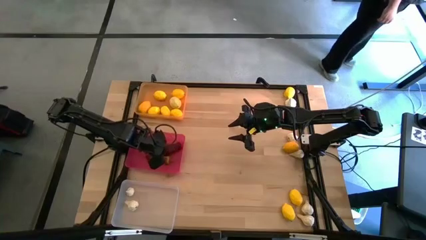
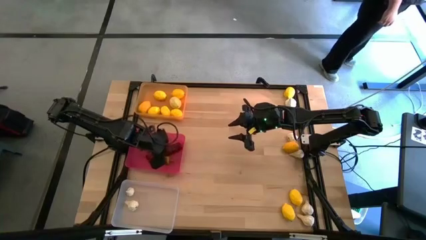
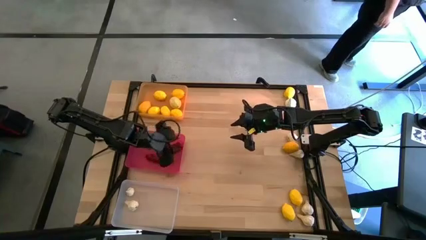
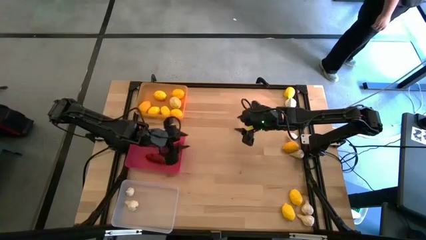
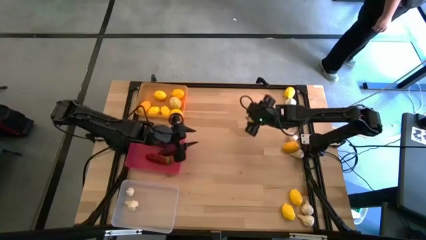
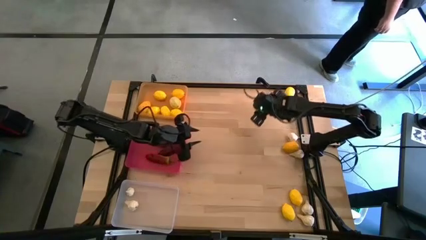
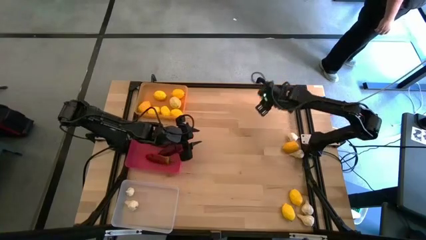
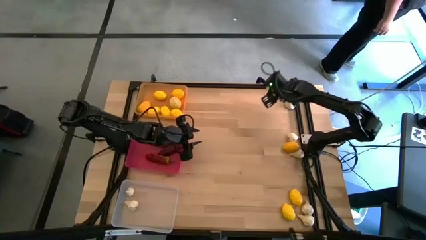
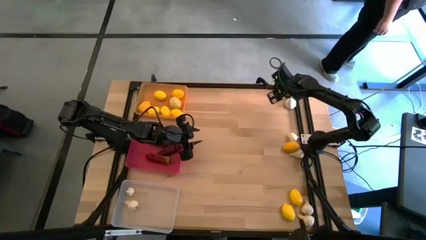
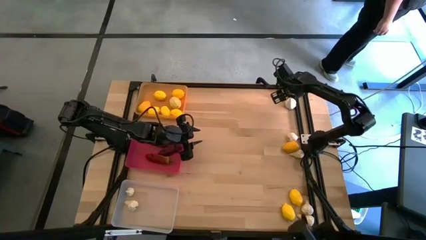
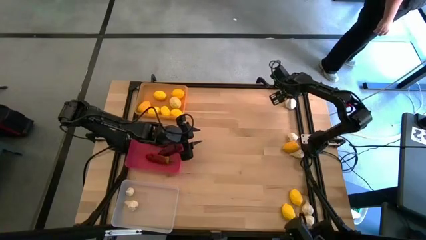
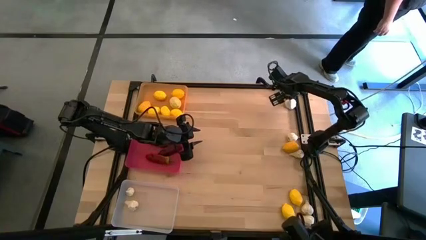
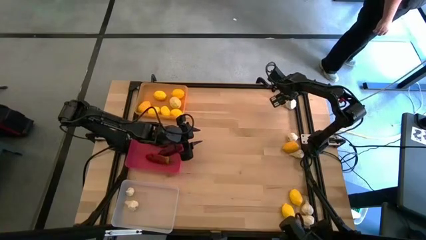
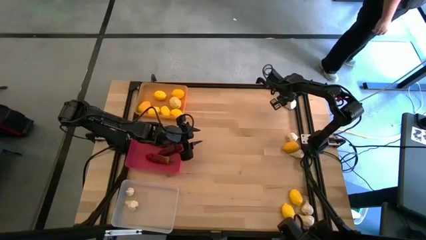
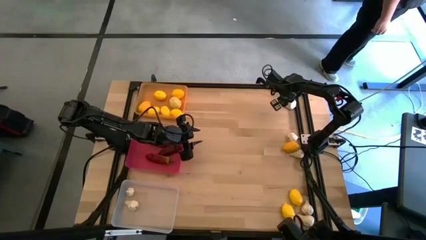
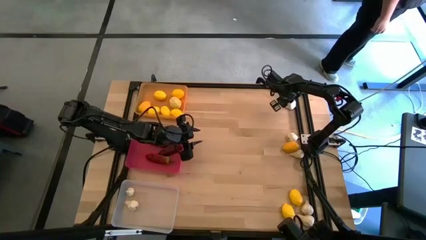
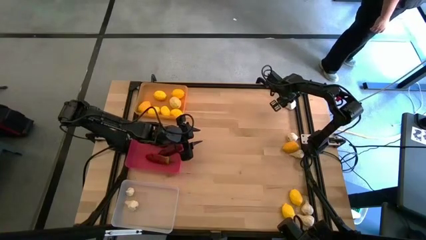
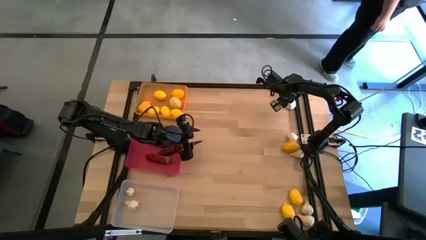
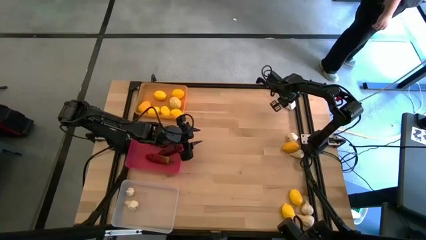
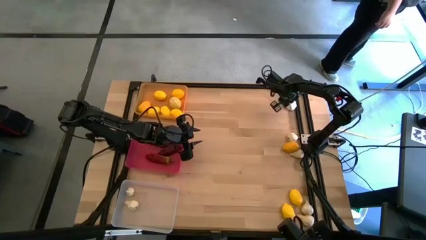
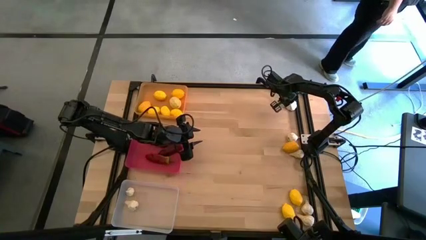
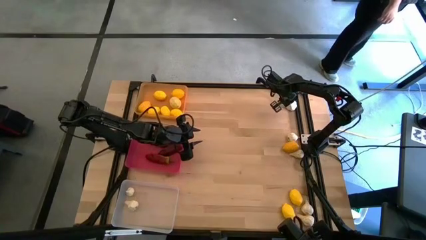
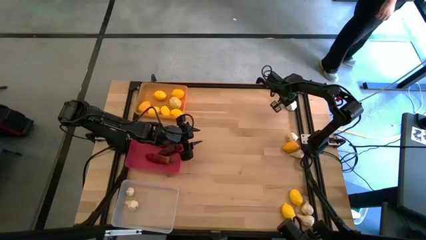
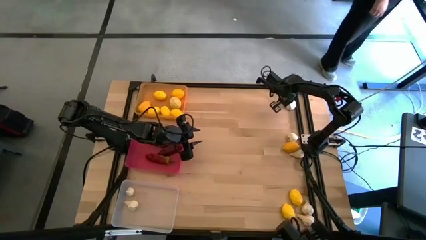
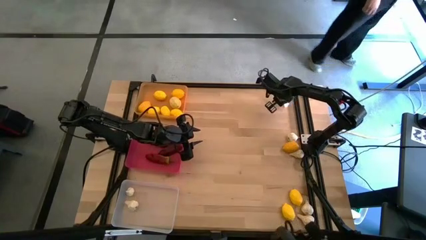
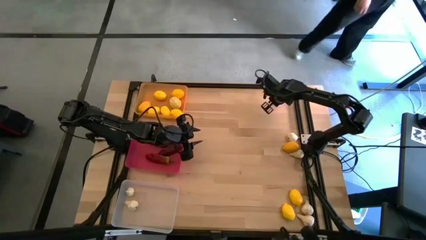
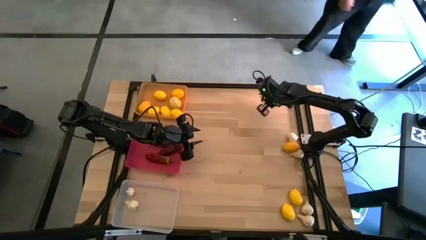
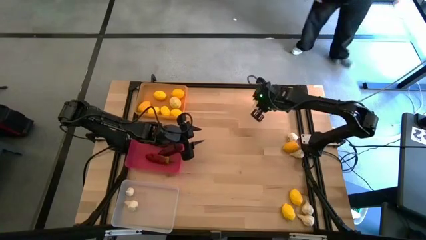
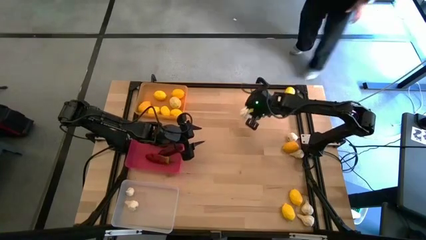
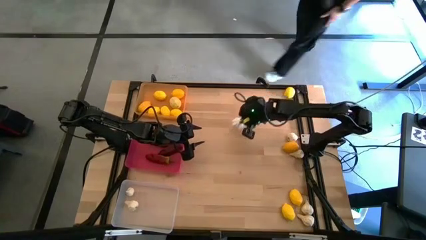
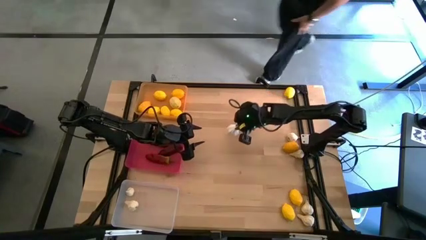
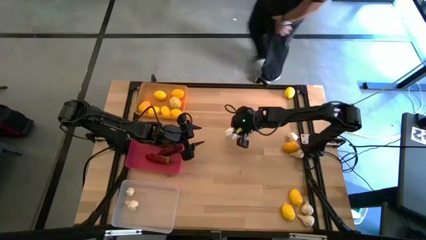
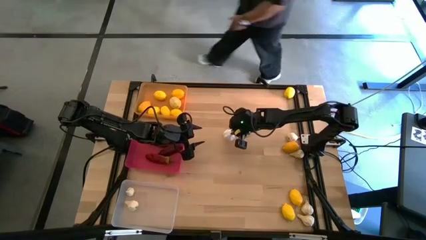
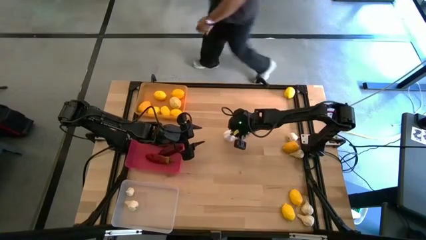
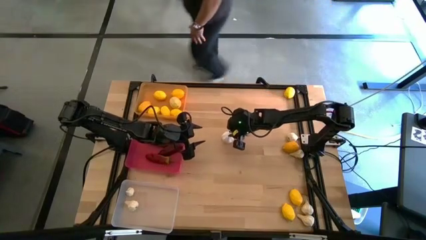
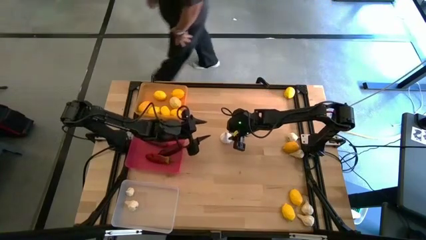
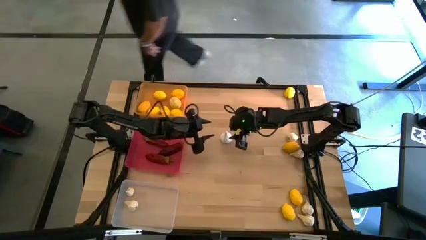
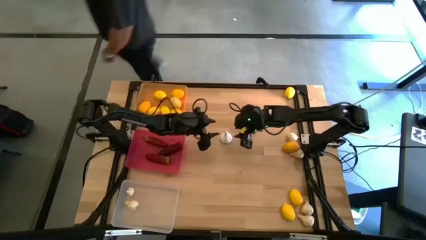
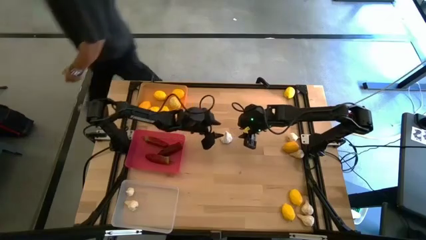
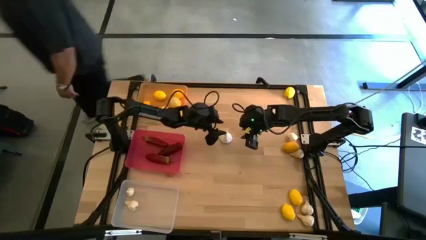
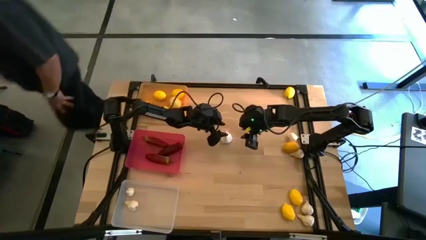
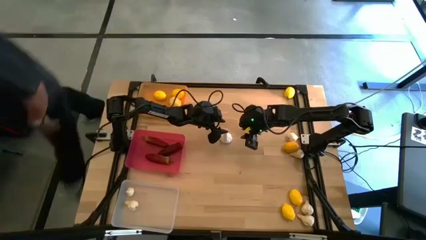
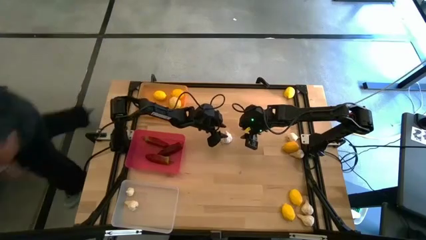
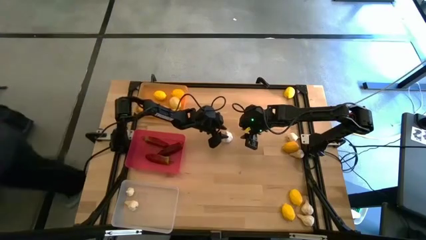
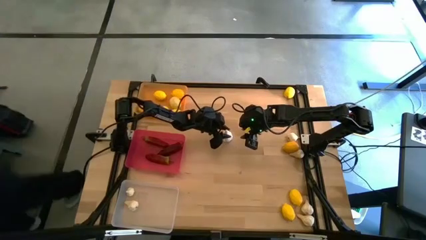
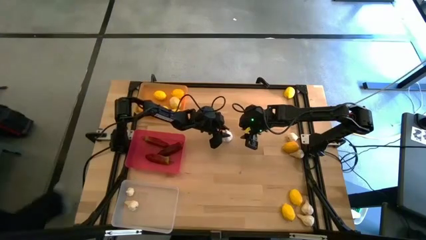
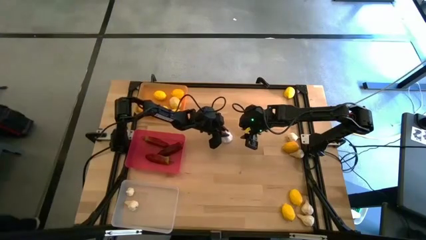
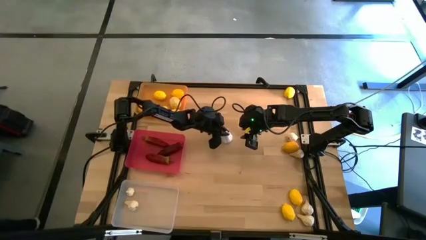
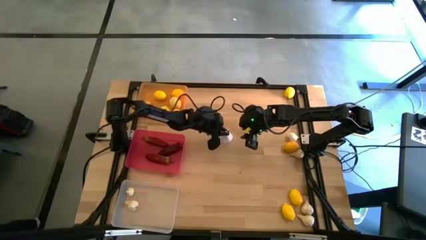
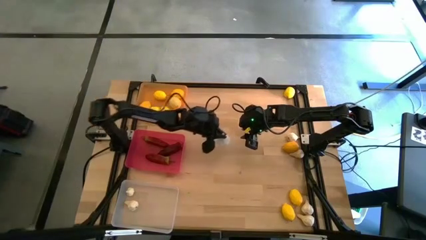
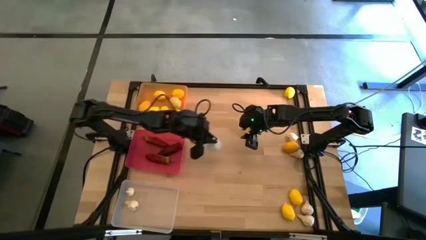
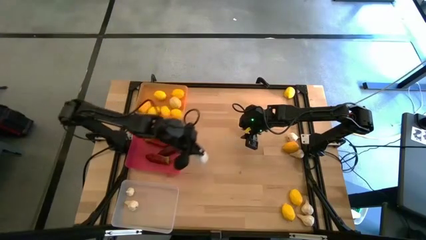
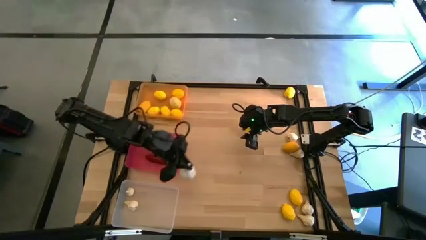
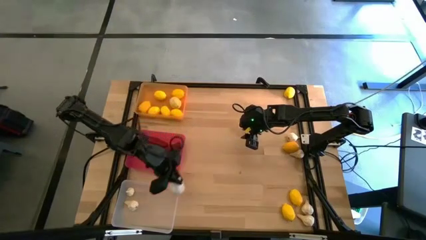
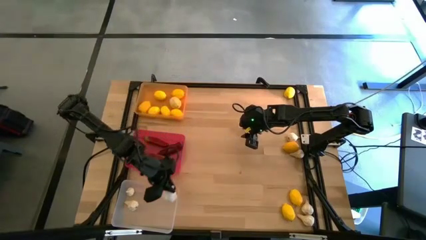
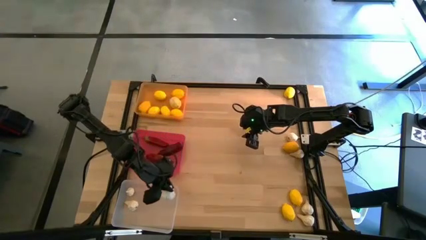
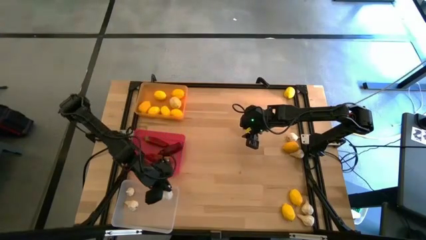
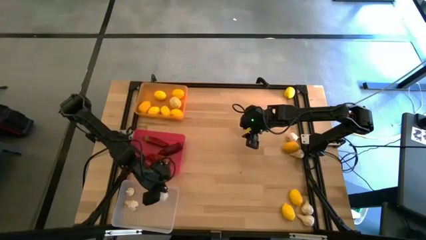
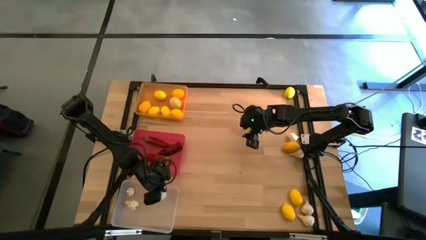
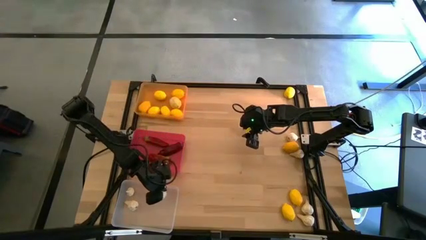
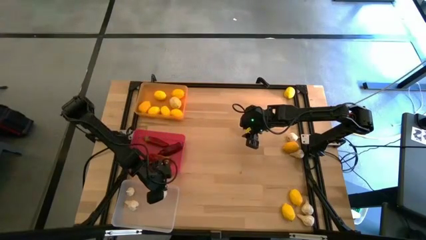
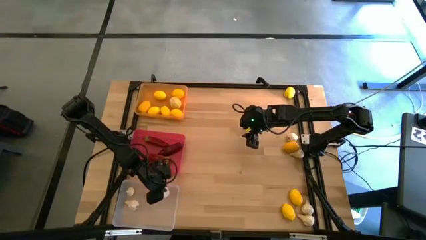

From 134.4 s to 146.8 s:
Task: Sort produce into baskets
Put the garlic into the transparent bin

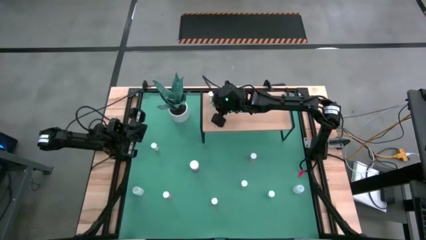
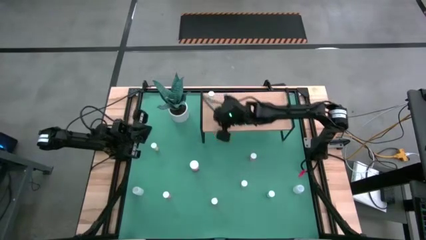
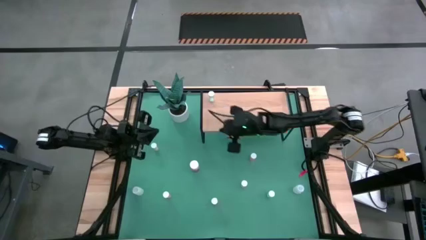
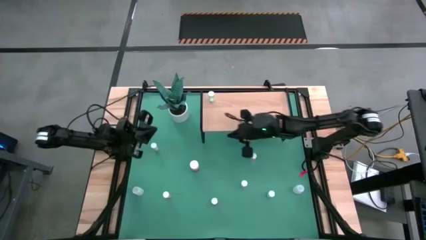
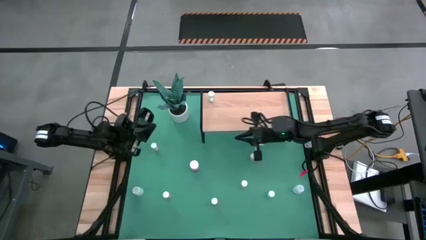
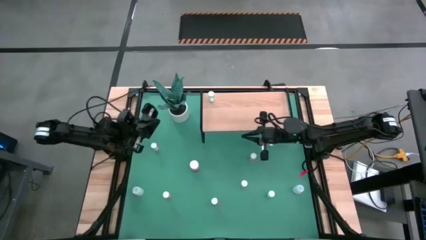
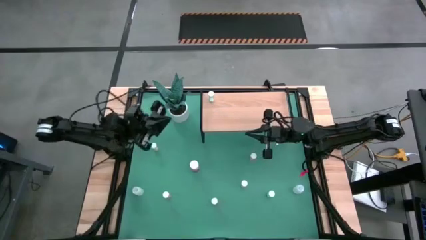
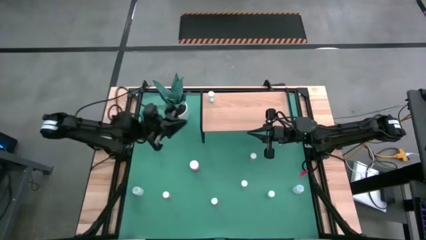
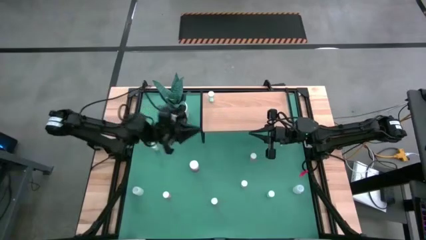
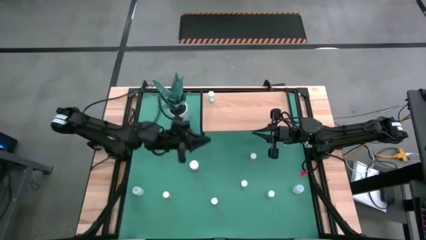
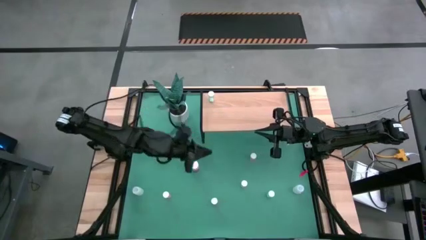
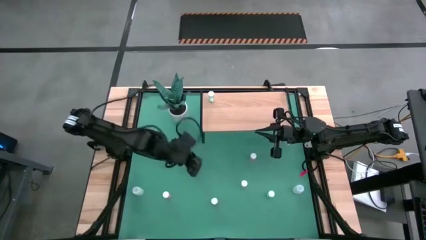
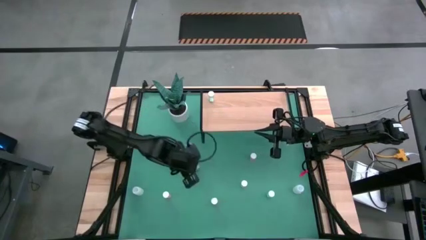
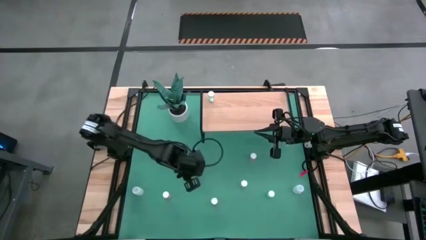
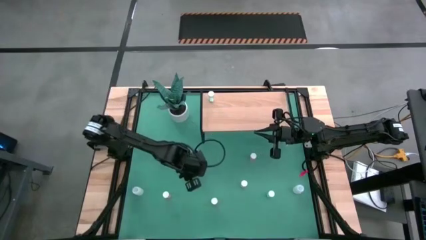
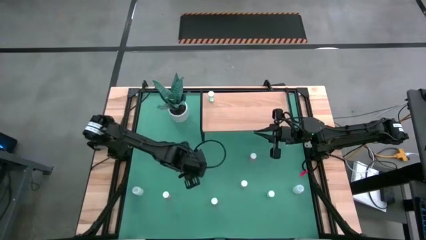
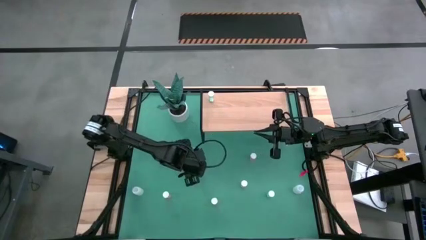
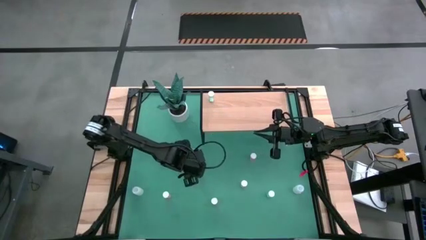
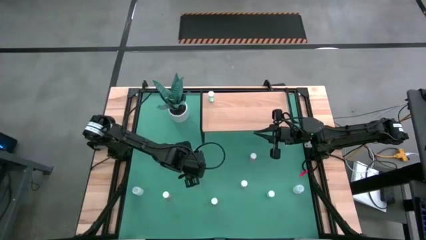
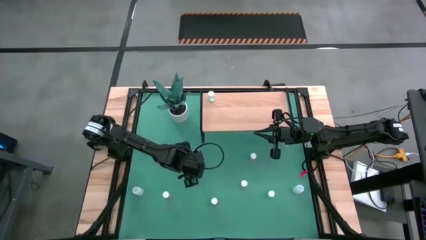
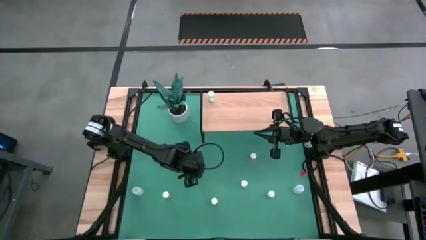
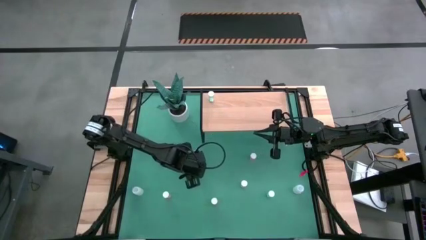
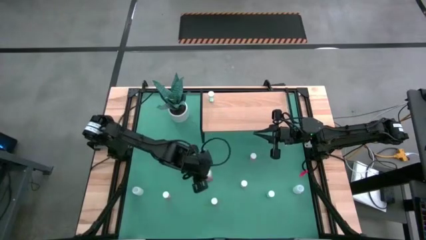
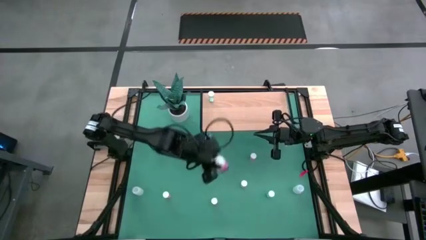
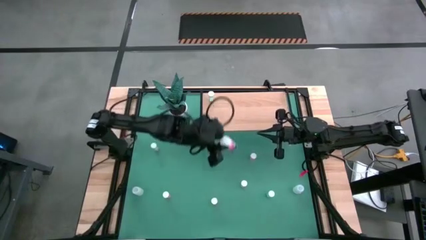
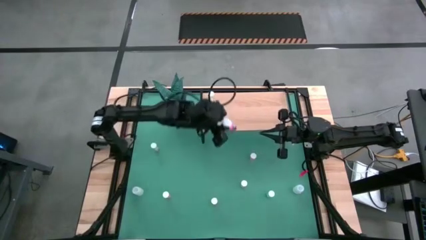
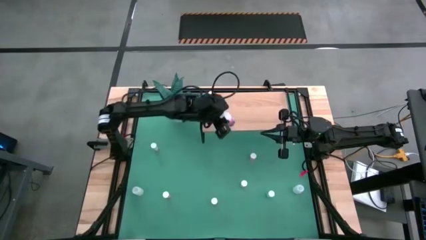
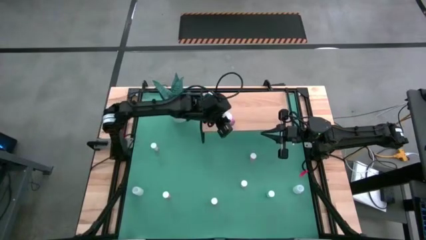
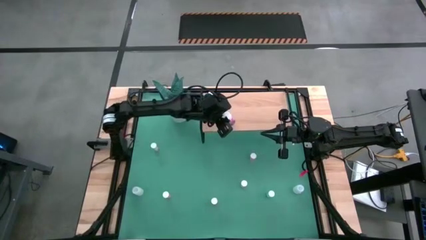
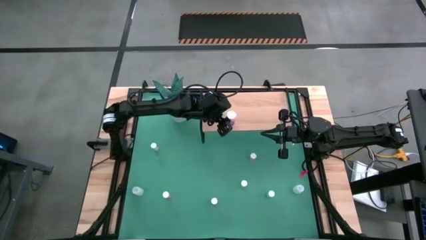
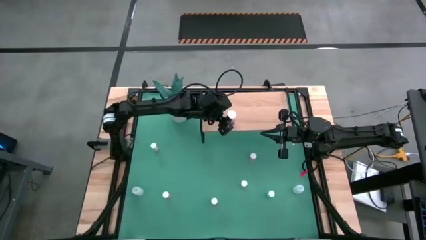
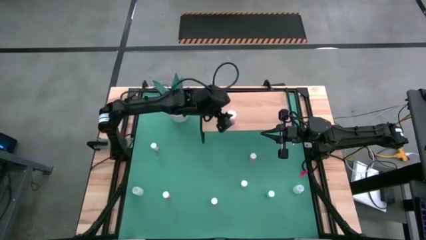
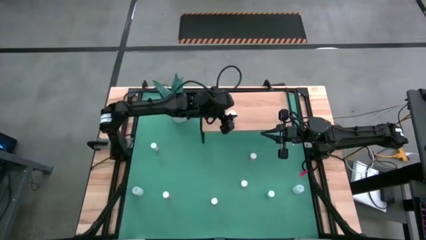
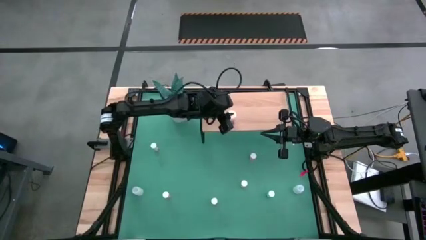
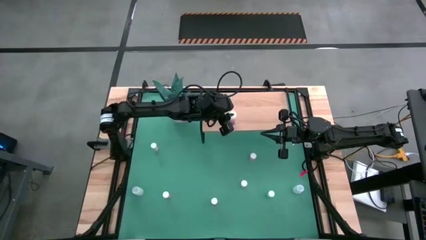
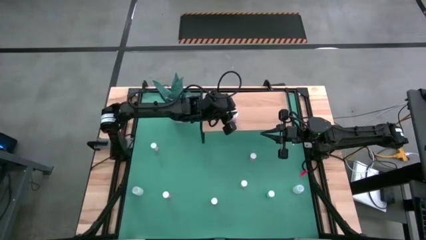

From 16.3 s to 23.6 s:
Task: Pick and place medicine bottles onto shelf by color
Put the pink pill bottle on the shelf
